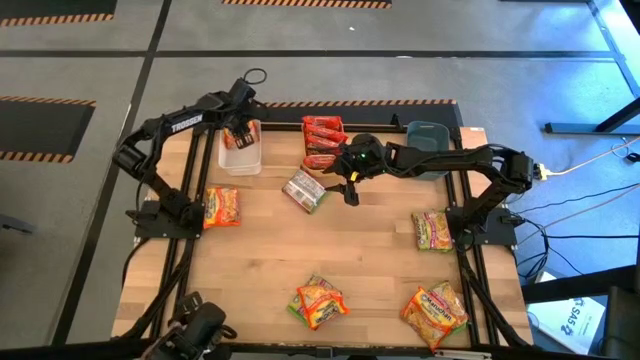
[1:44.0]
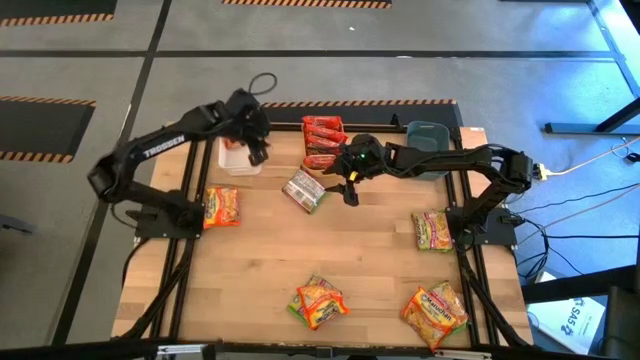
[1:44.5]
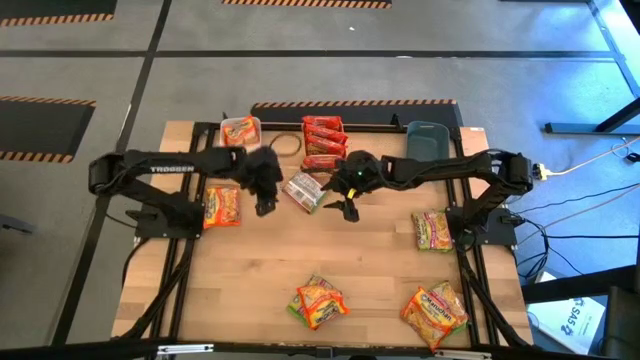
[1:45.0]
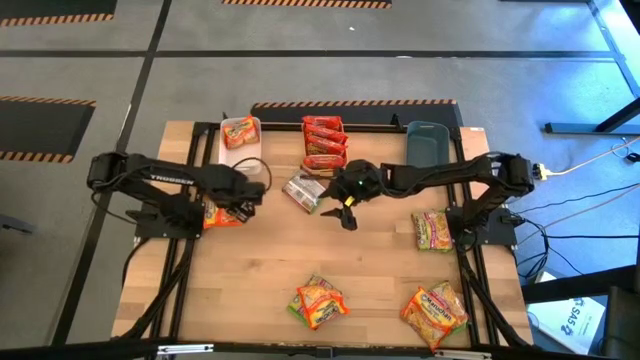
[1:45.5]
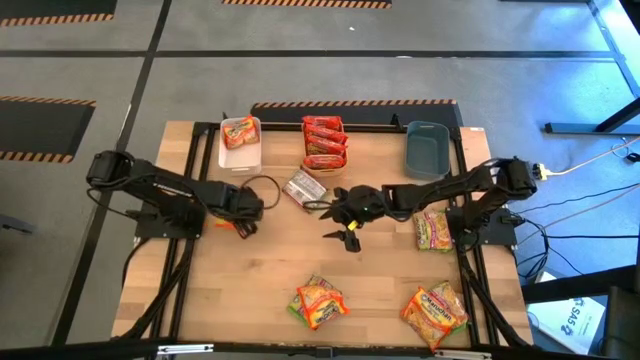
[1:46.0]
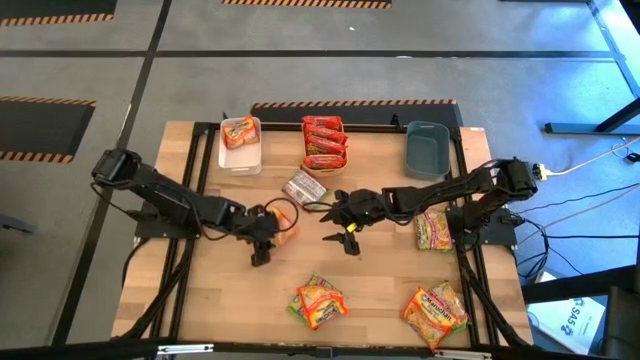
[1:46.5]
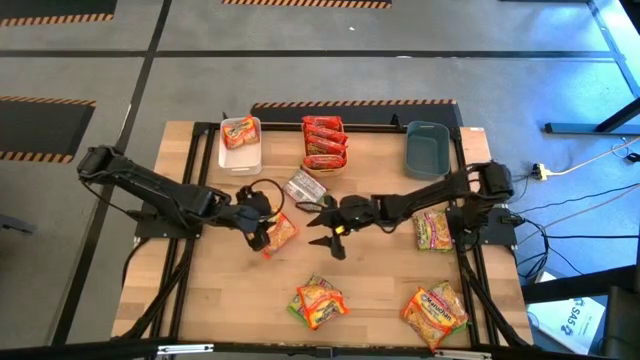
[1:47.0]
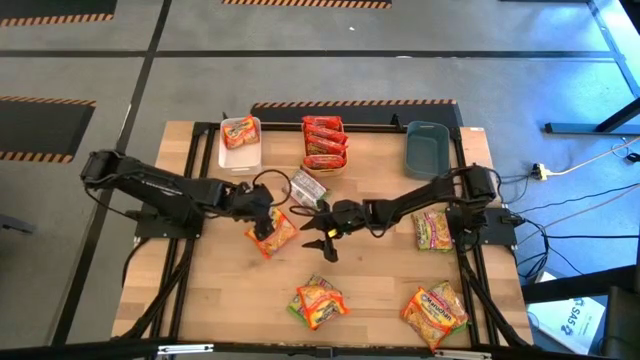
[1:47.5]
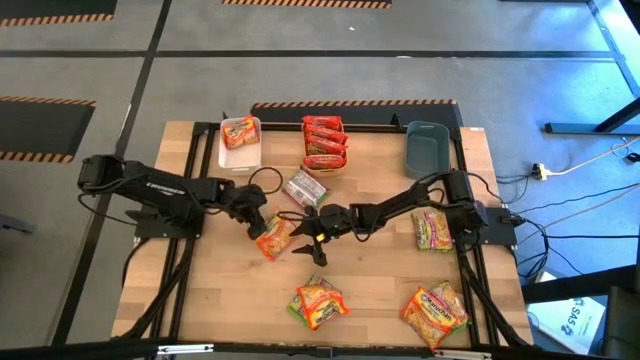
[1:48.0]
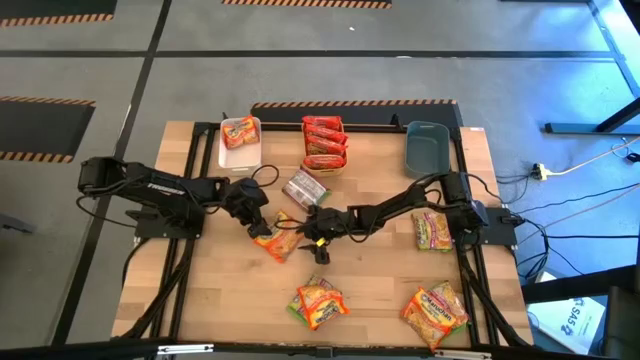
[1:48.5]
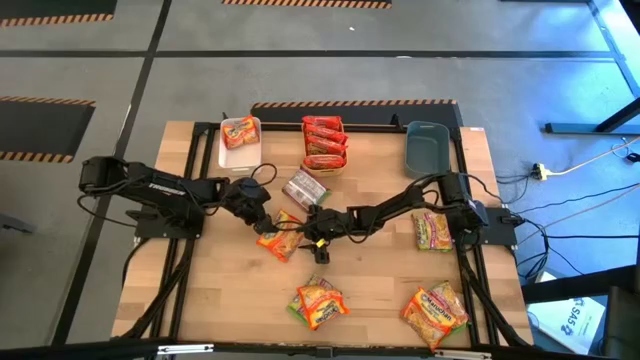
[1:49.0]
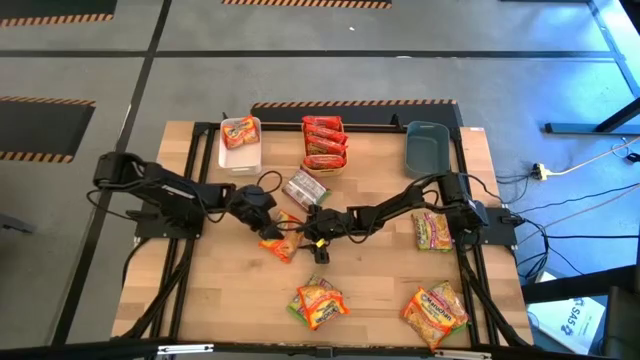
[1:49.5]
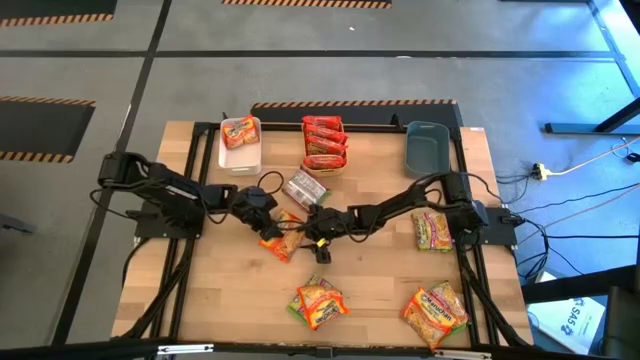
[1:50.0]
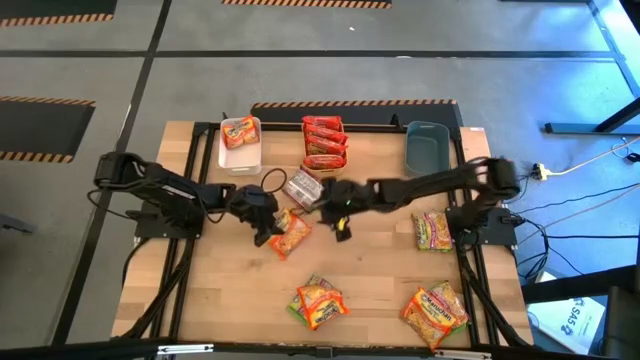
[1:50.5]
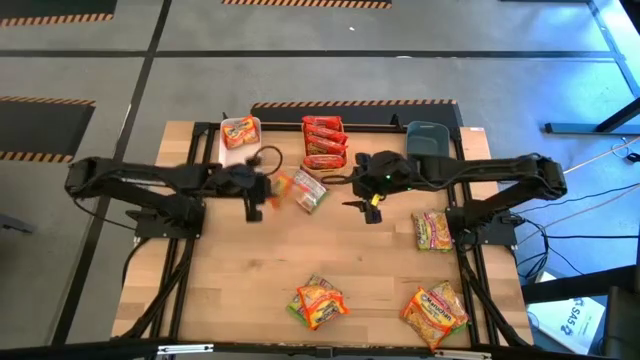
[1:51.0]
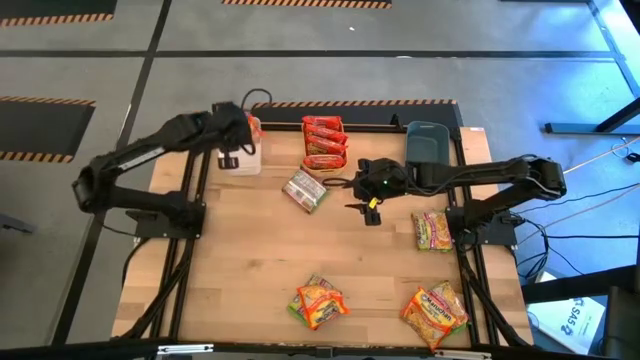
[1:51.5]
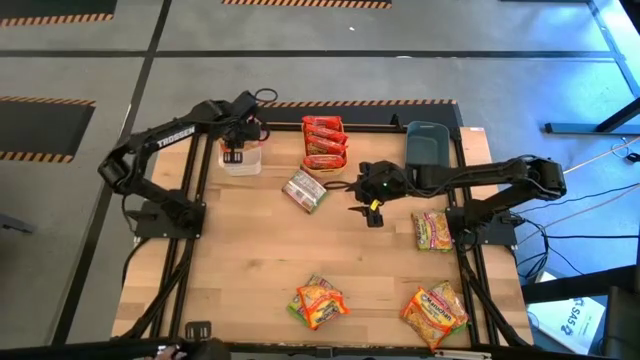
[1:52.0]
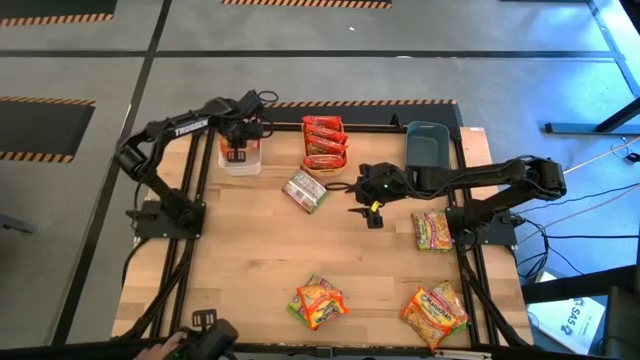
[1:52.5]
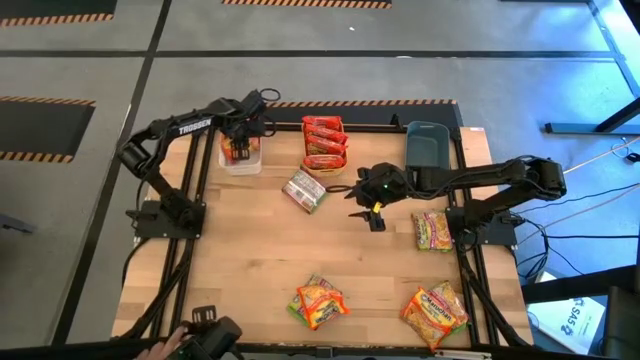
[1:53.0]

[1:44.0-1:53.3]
Task: Sort Maruchan noodles
Put the light orange noodle pack into the white bin

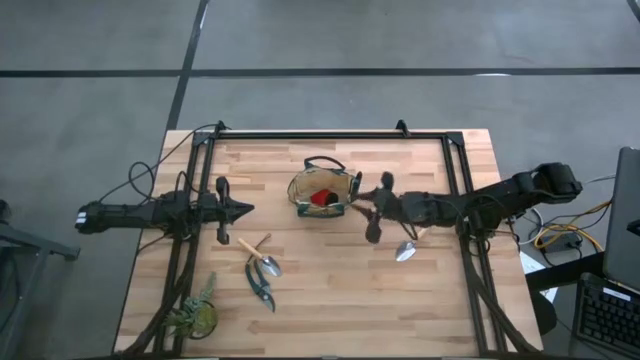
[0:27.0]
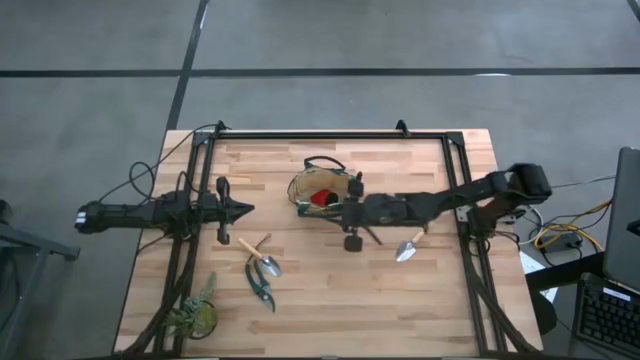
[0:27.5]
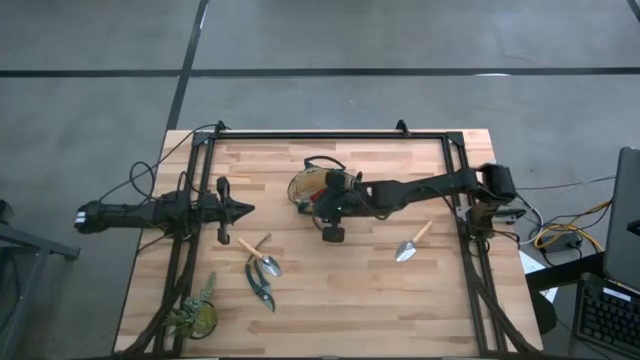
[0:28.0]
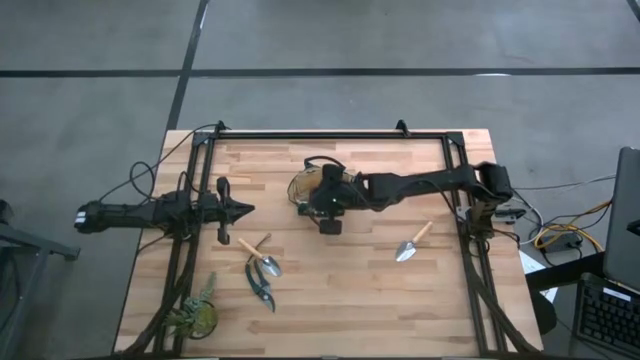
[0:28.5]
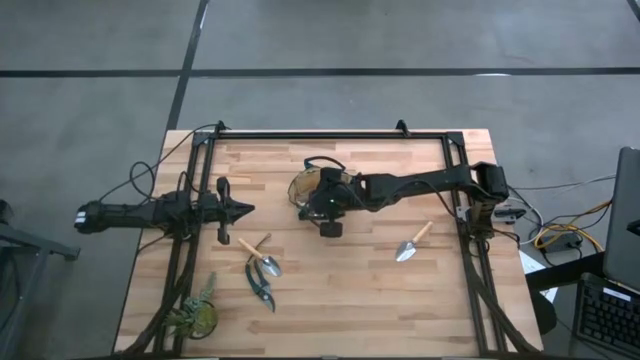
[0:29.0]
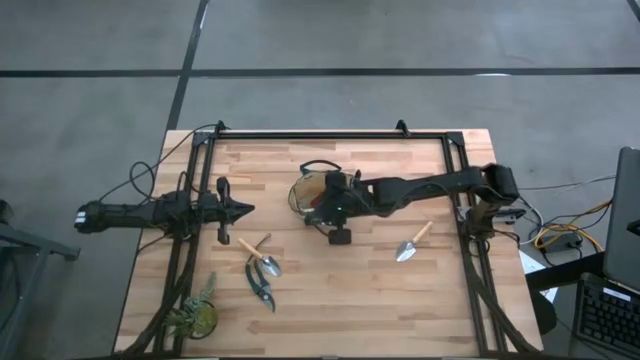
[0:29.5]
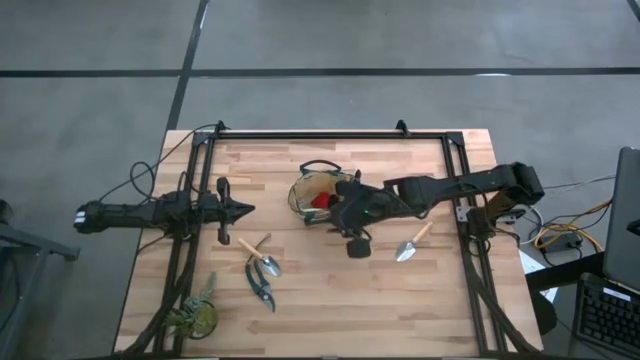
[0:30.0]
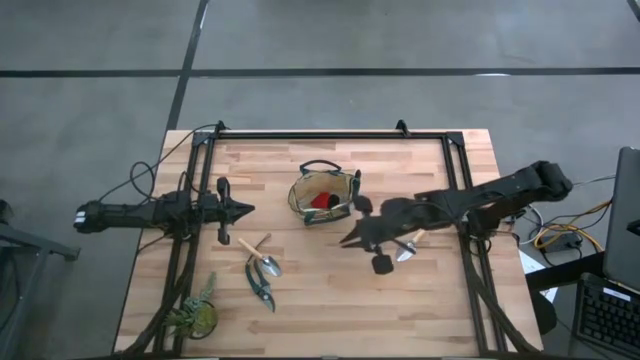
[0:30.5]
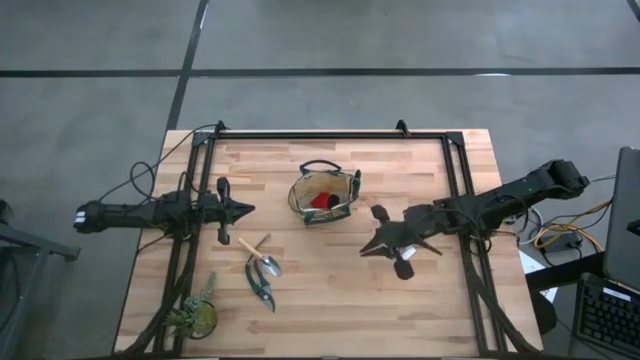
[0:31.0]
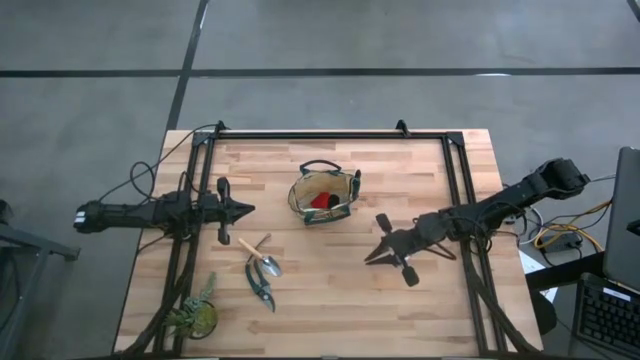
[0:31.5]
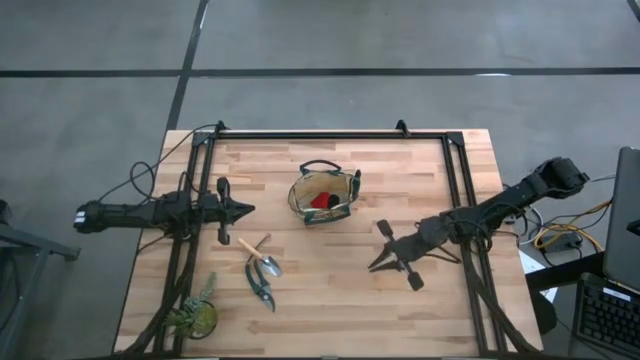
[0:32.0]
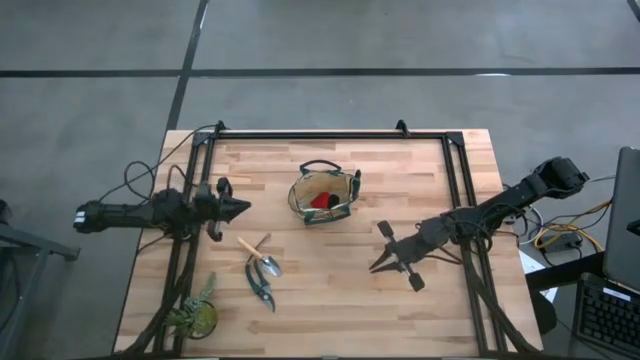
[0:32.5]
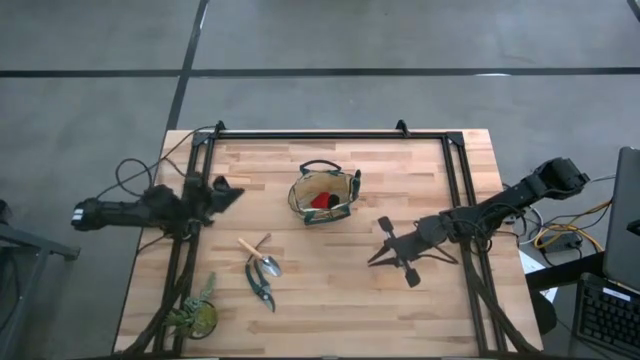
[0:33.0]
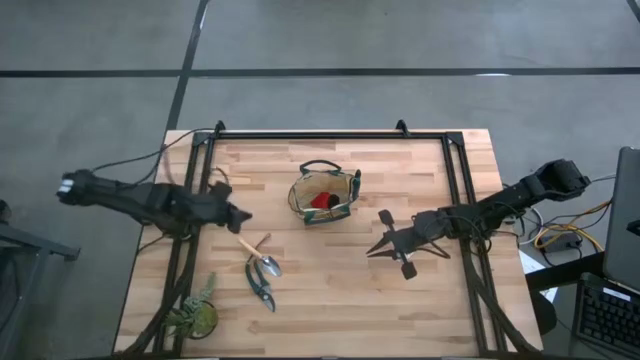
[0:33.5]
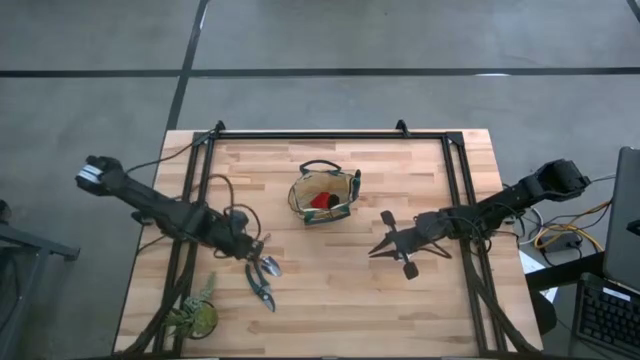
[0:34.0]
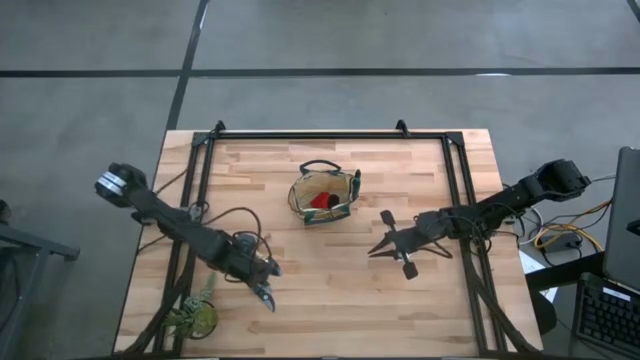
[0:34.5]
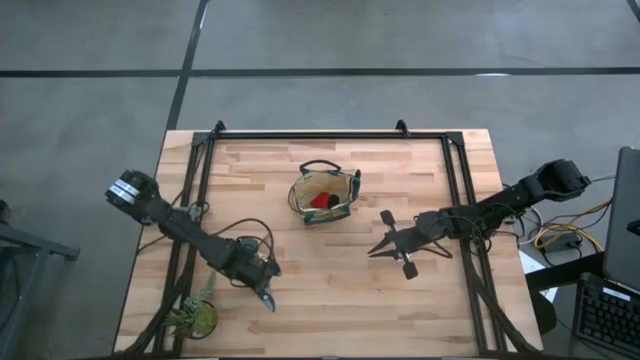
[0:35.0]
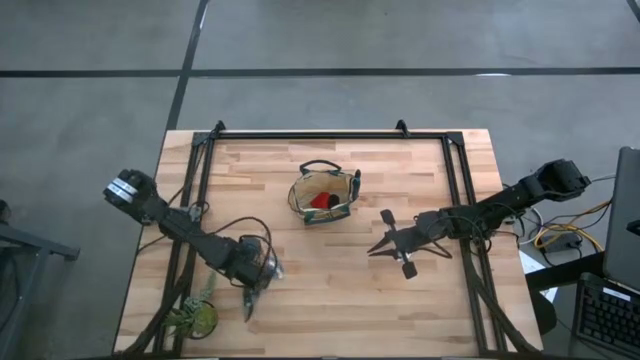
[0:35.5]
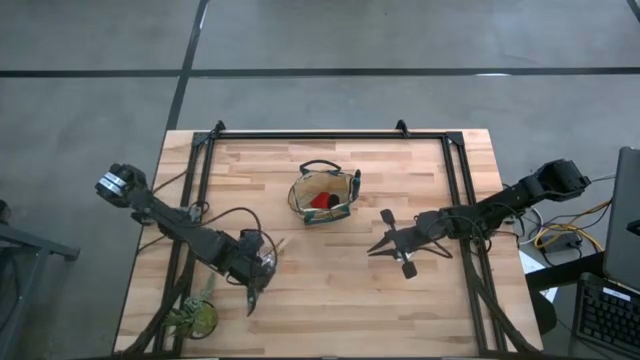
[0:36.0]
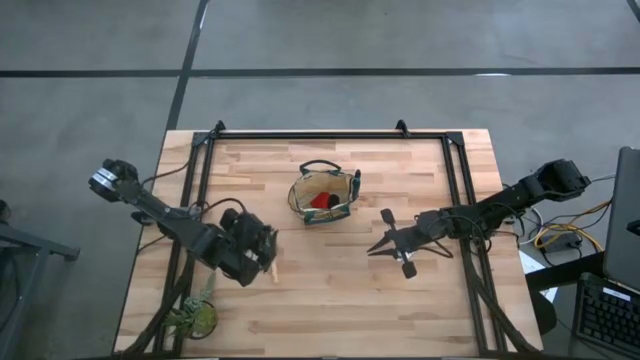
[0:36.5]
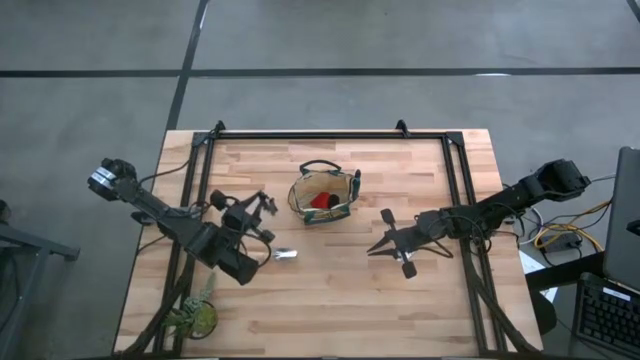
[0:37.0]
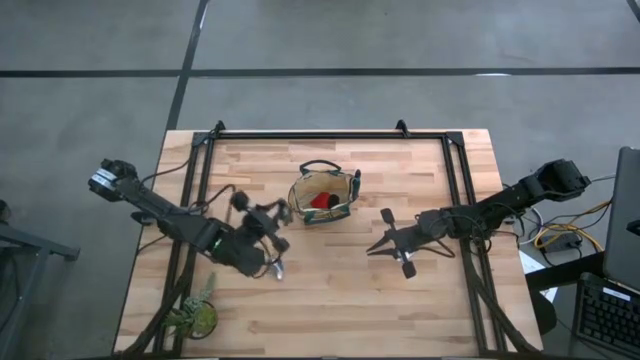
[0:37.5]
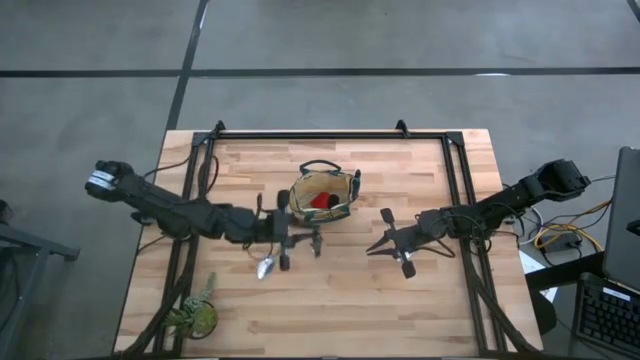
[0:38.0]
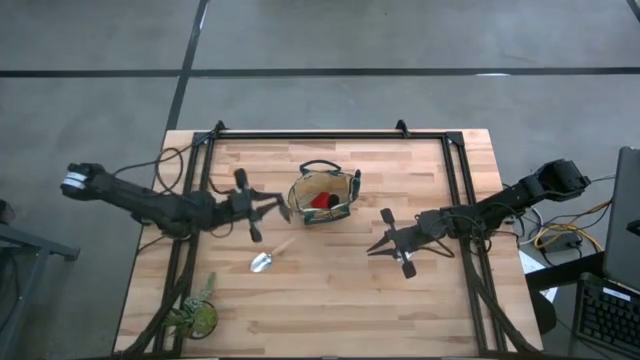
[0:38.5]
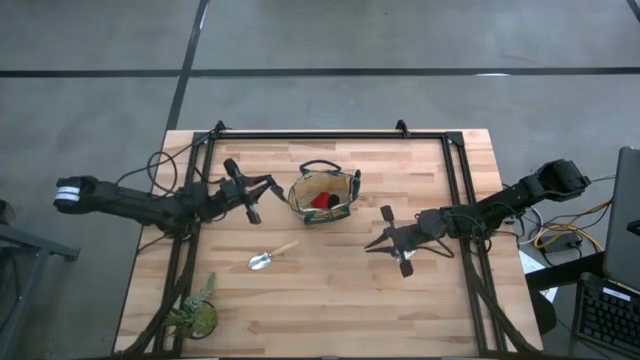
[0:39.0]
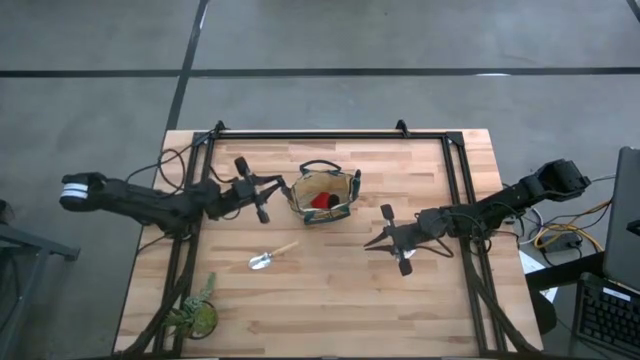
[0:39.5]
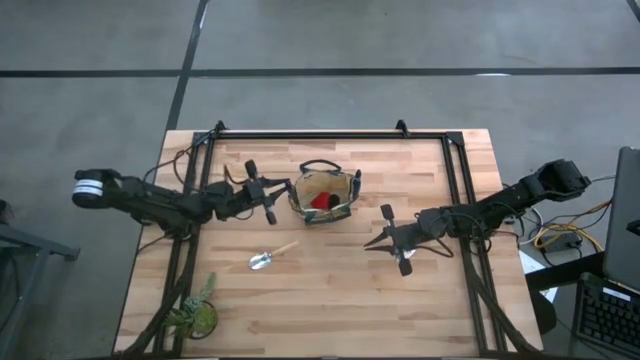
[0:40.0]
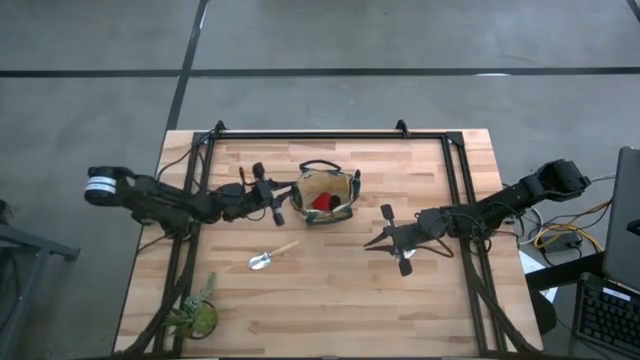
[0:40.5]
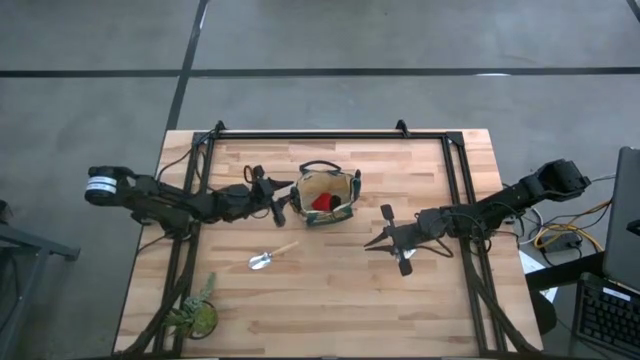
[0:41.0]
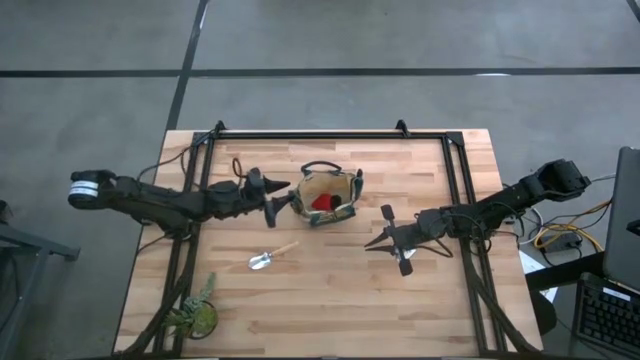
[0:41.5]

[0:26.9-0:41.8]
Task: Pick & Place Garden tools in Gardening bag
Put the green shear scissors into the gardening bag
